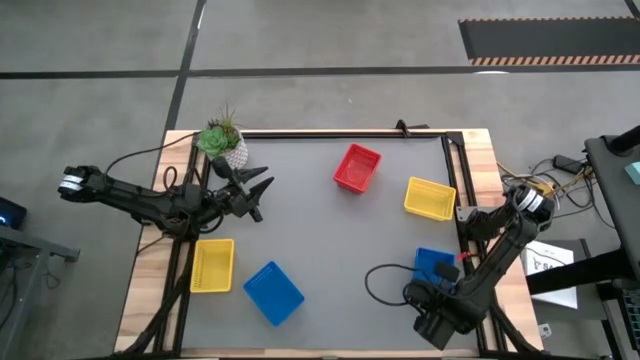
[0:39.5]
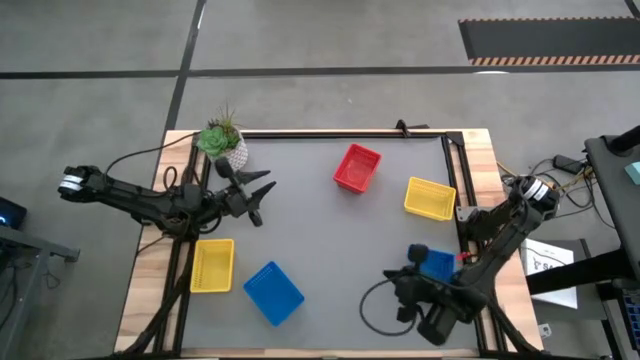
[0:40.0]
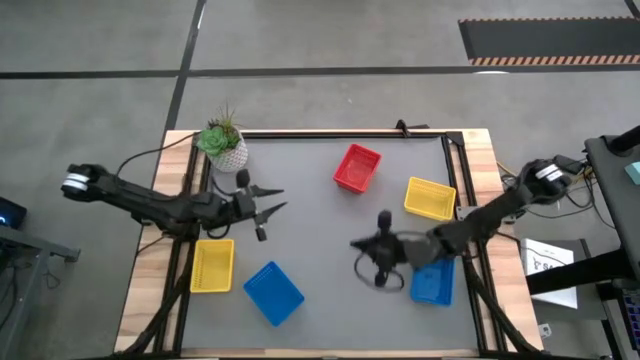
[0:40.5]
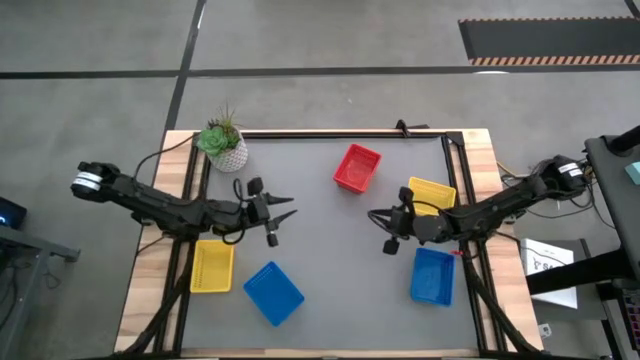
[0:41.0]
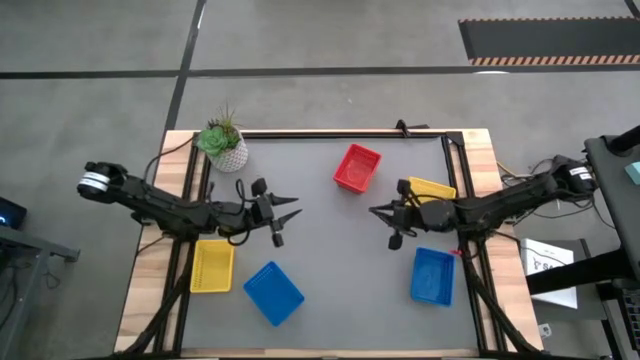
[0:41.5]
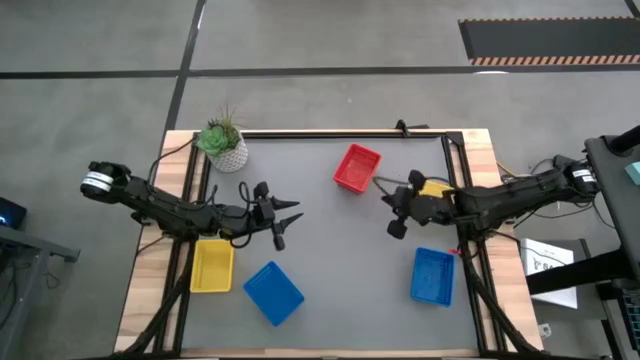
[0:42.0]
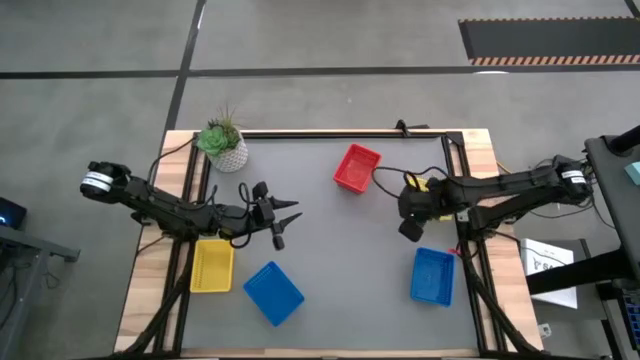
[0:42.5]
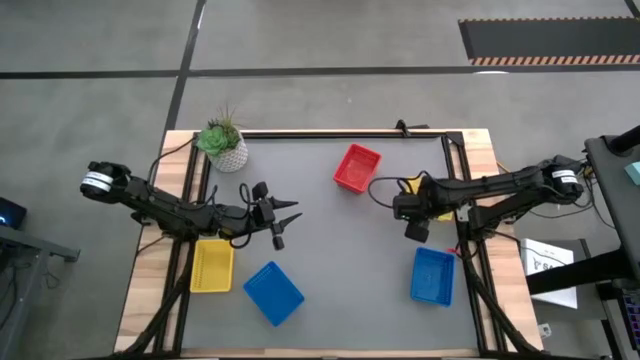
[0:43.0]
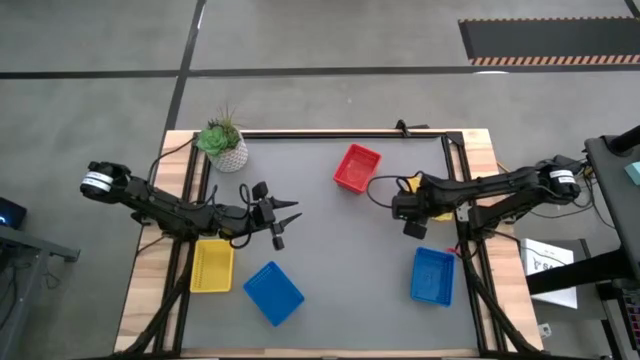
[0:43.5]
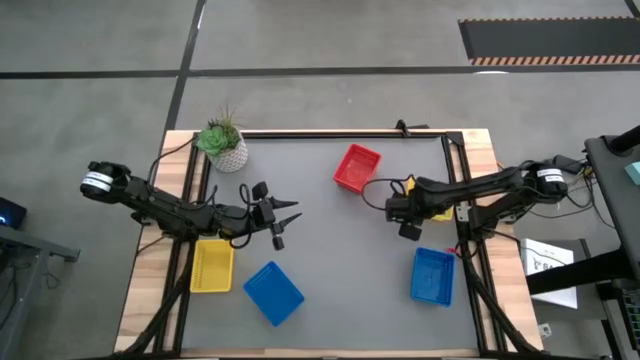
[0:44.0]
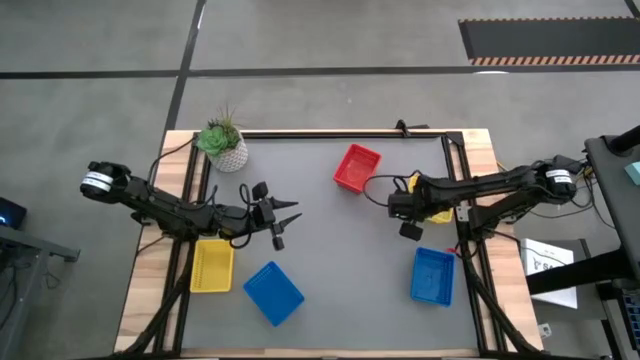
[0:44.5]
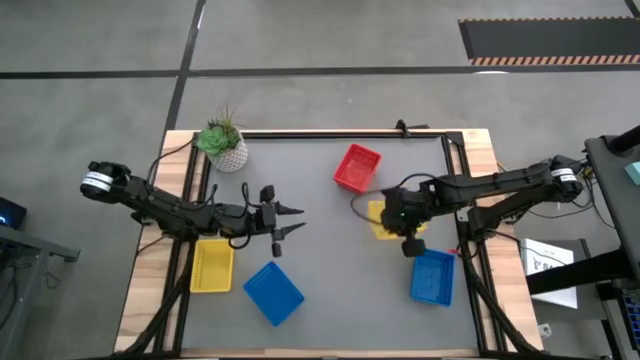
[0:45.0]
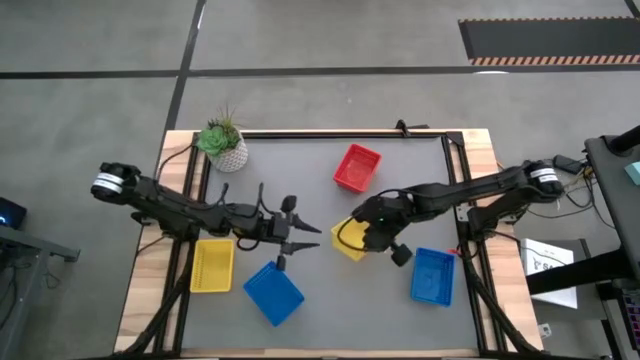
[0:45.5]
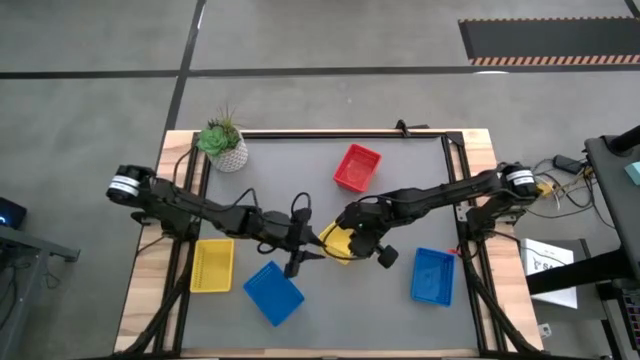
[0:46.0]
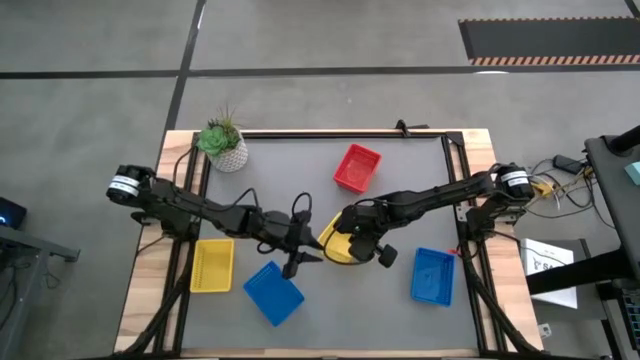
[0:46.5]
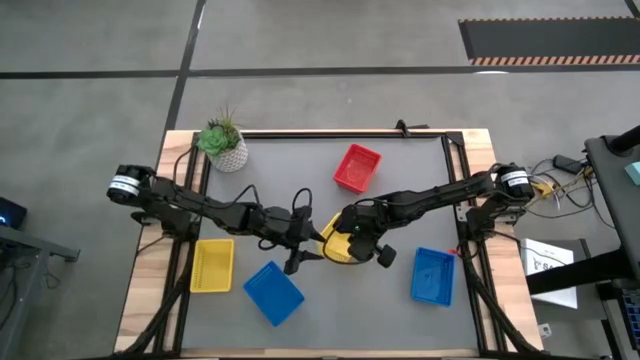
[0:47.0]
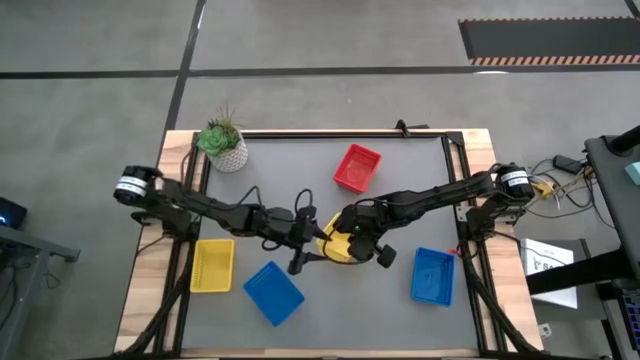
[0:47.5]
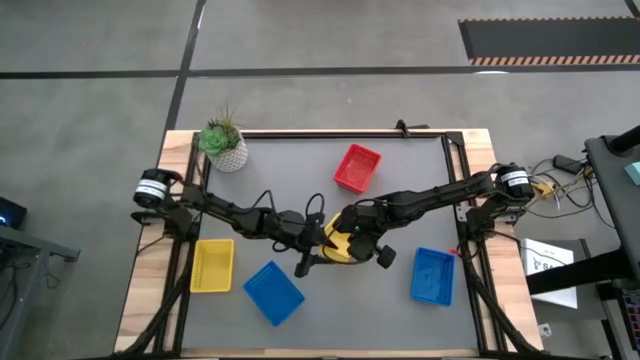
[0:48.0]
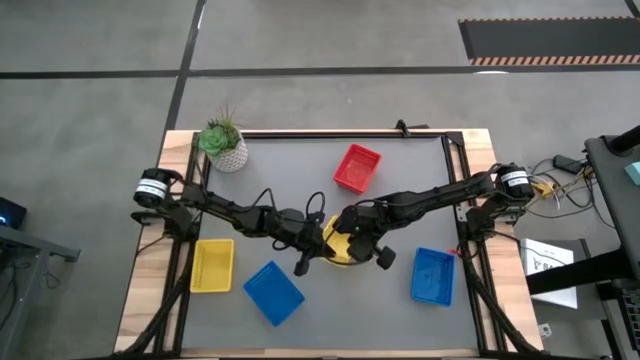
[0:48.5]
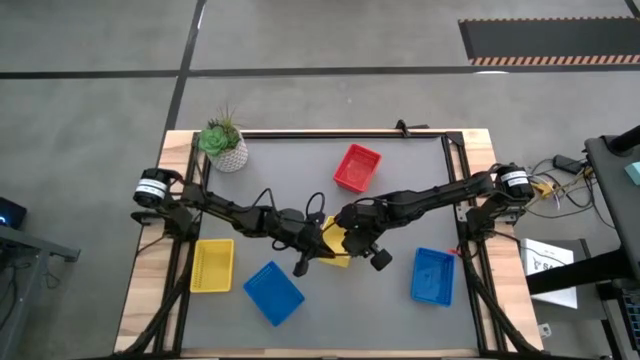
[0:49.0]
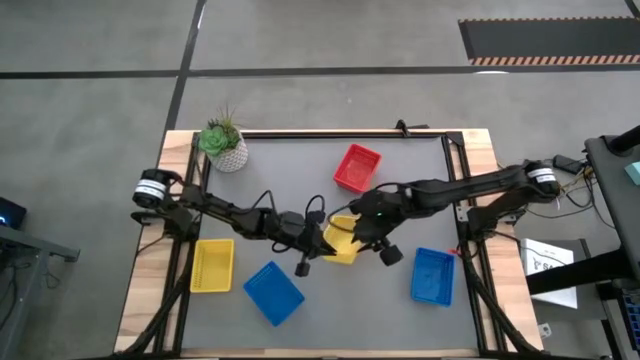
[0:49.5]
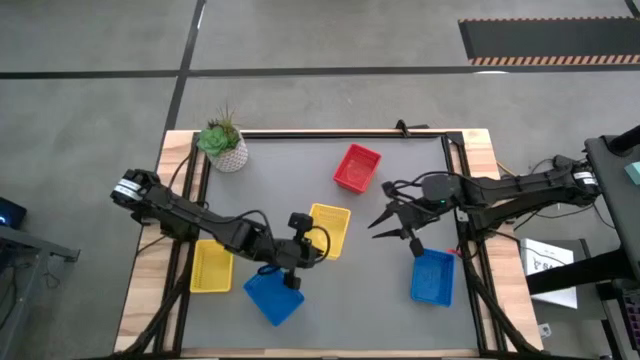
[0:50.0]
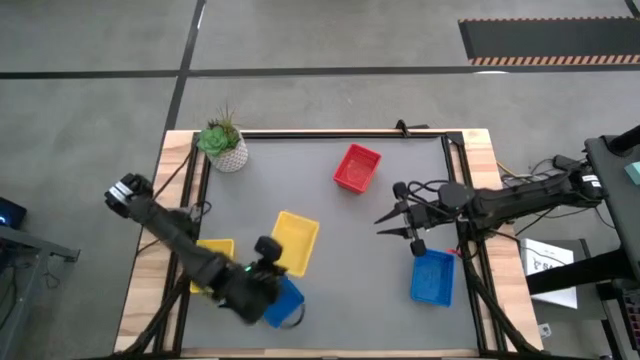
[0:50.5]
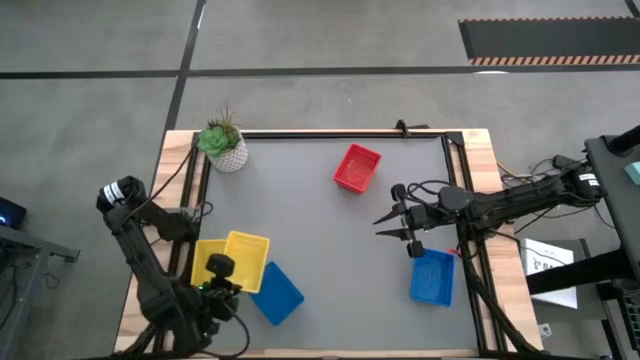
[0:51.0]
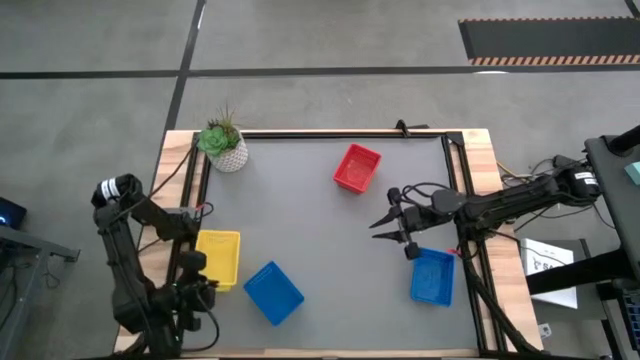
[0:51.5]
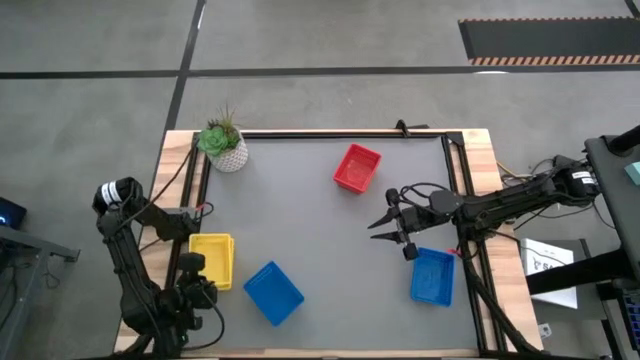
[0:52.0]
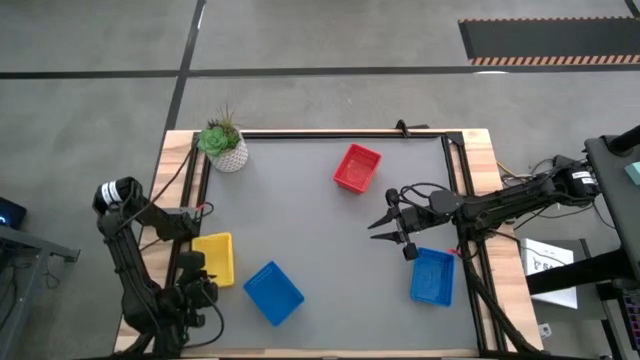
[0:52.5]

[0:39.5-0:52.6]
Stack the top yellow bin on the bottom yellow bin

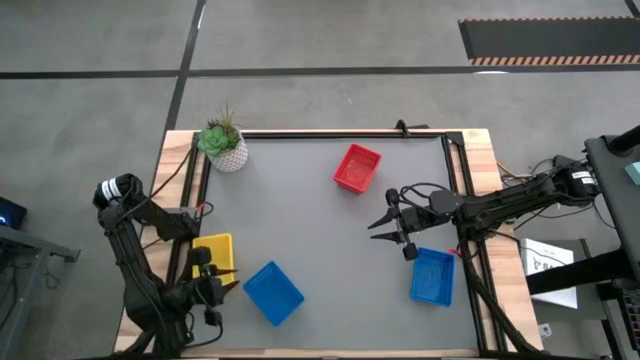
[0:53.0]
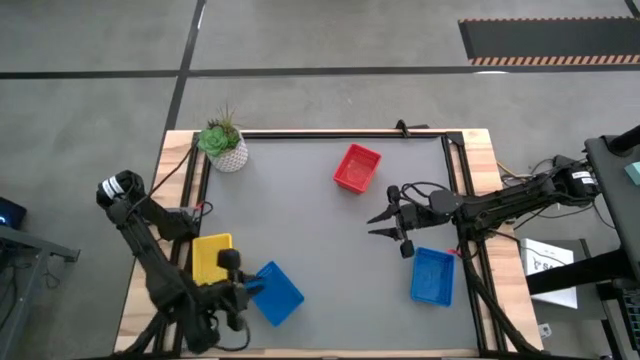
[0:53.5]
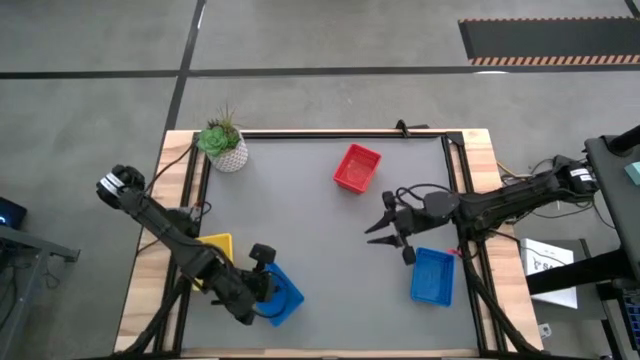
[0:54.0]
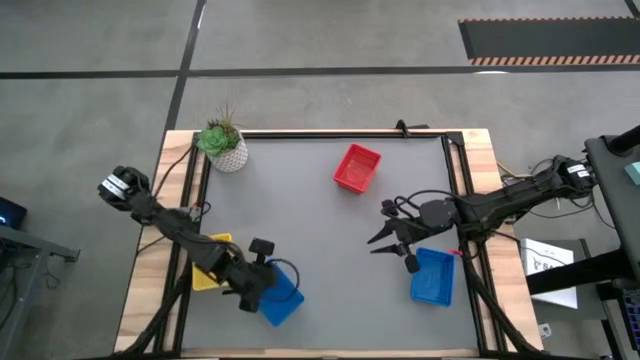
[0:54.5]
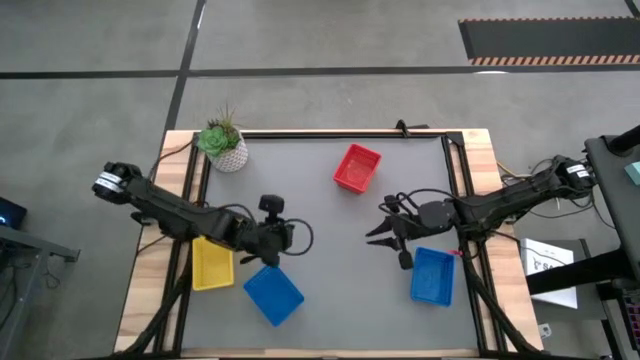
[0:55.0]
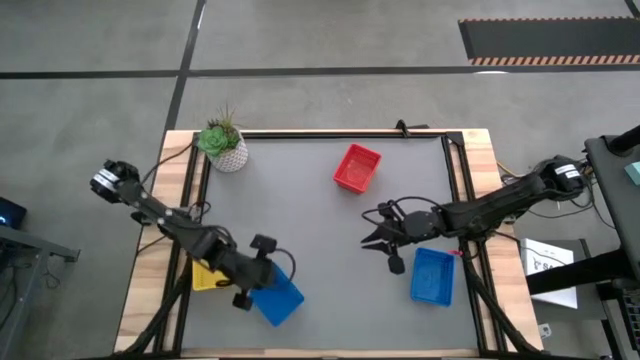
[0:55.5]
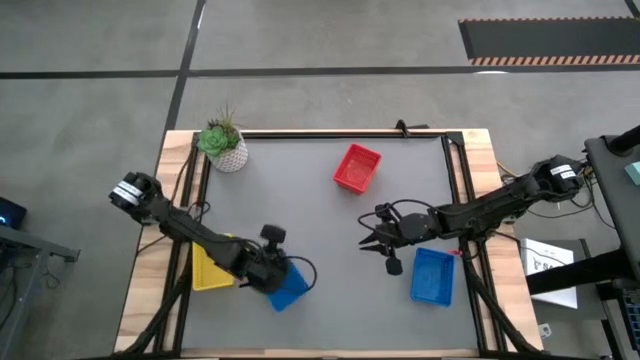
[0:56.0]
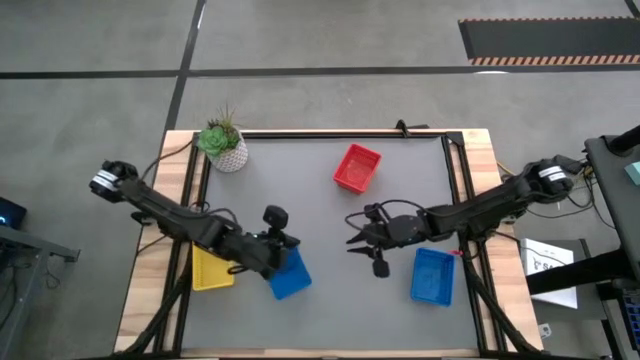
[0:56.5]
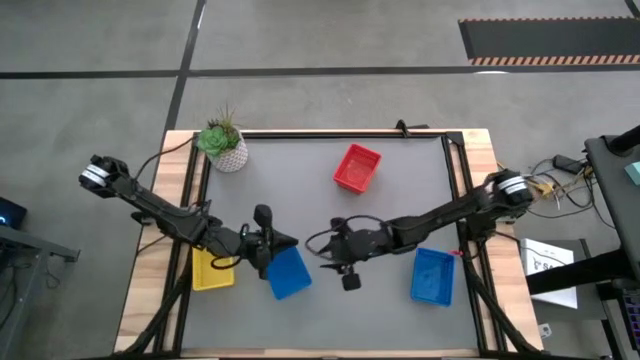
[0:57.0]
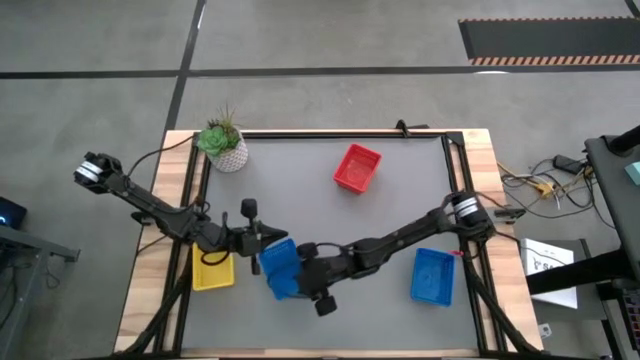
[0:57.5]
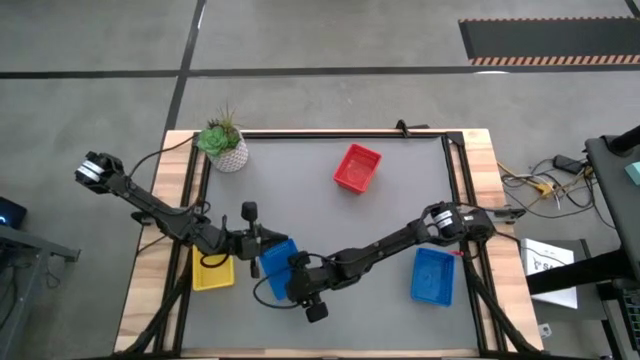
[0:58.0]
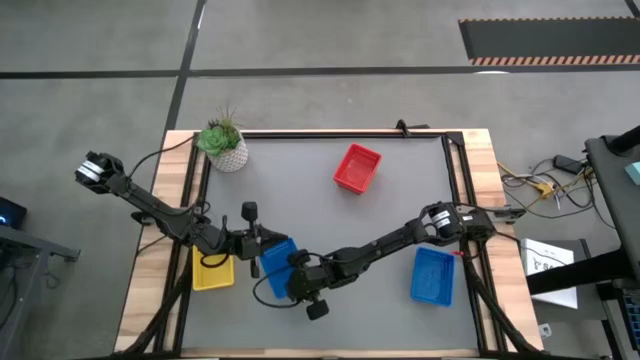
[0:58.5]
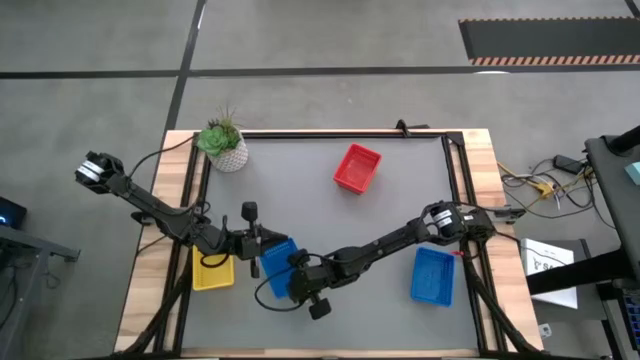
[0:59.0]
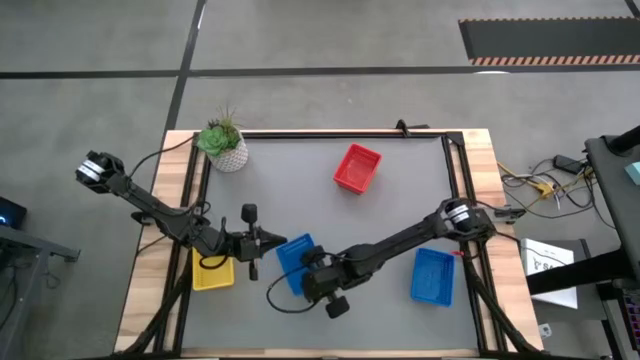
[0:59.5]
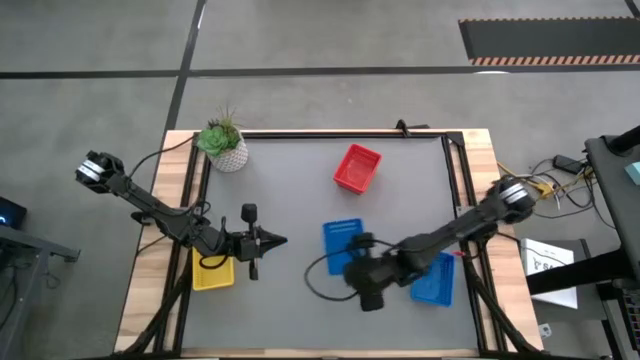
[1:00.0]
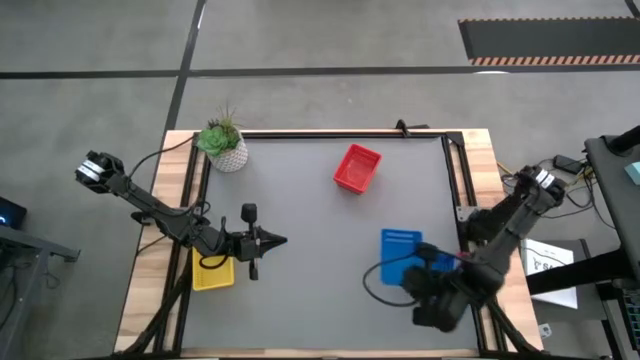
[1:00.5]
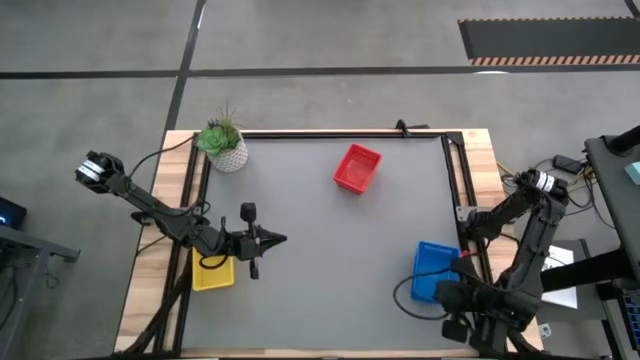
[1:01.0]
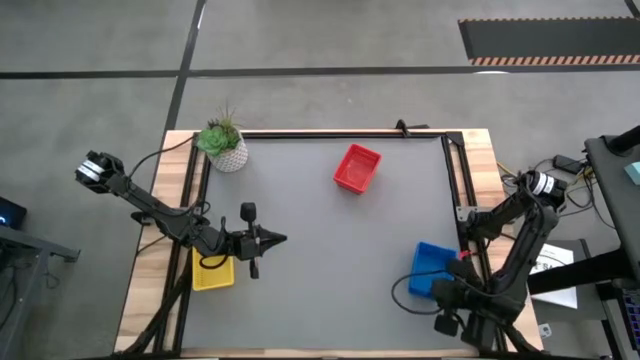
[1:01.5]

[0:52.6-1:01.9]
Stack the left blue bin on the right blue bin
